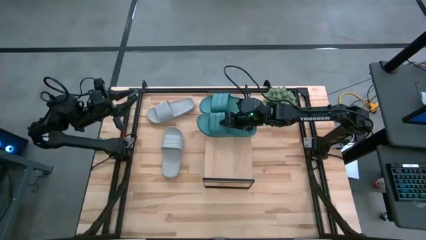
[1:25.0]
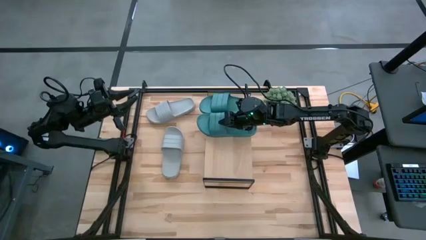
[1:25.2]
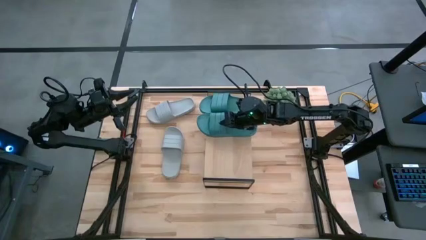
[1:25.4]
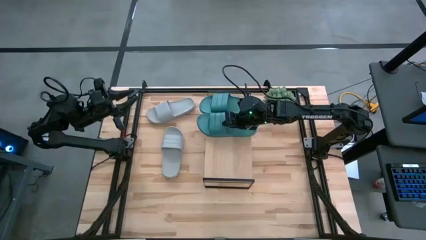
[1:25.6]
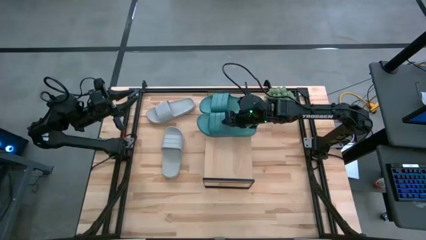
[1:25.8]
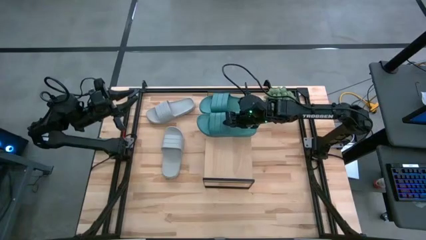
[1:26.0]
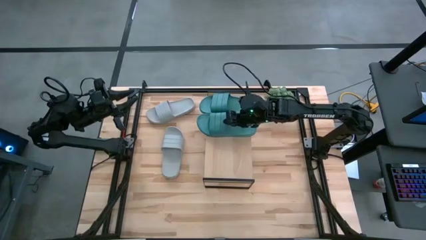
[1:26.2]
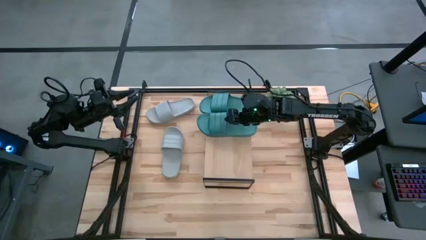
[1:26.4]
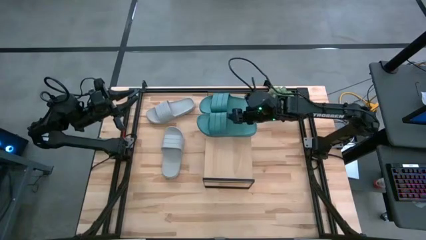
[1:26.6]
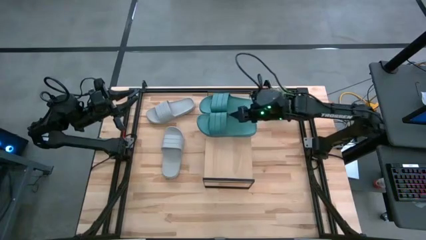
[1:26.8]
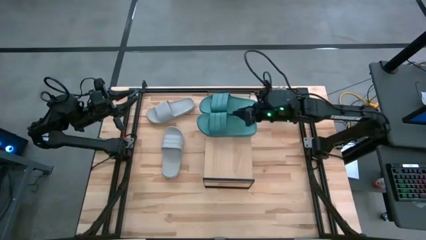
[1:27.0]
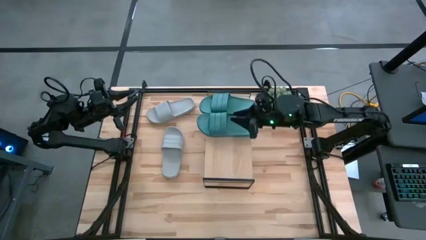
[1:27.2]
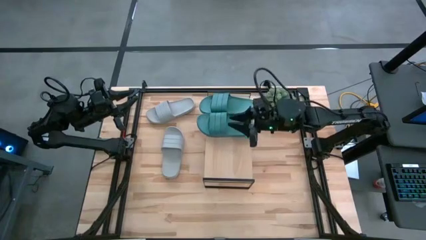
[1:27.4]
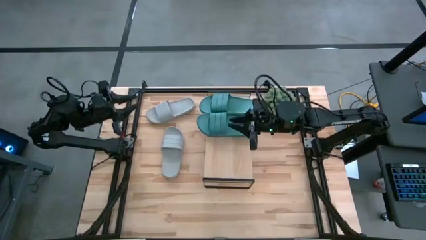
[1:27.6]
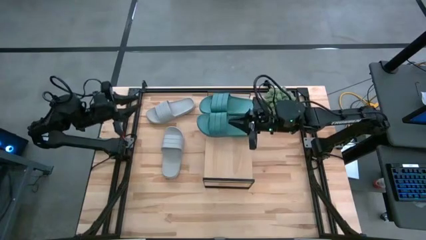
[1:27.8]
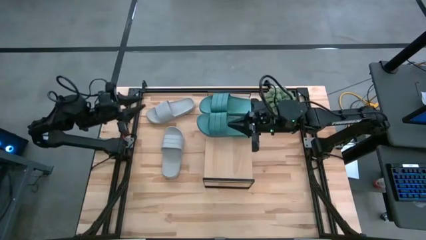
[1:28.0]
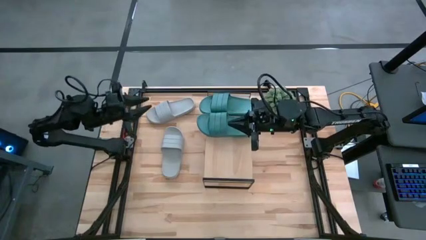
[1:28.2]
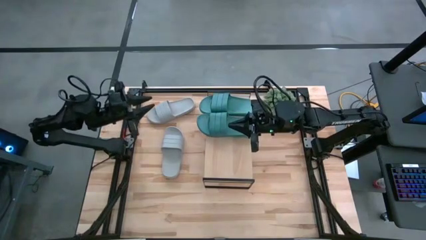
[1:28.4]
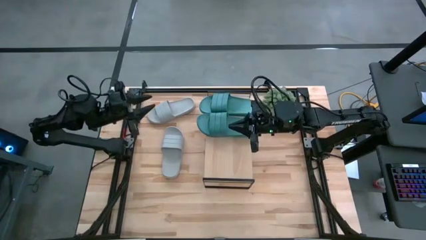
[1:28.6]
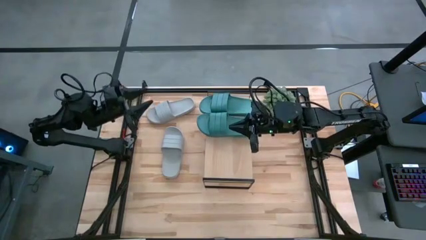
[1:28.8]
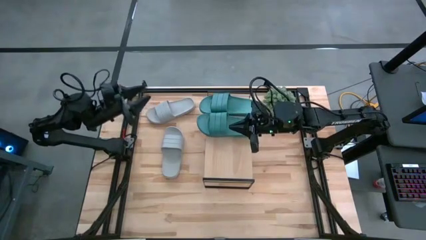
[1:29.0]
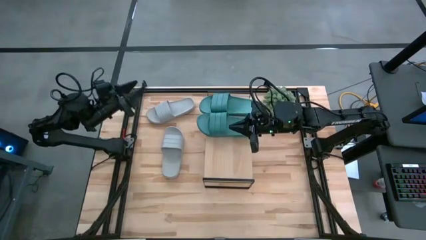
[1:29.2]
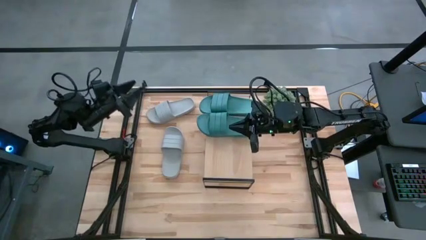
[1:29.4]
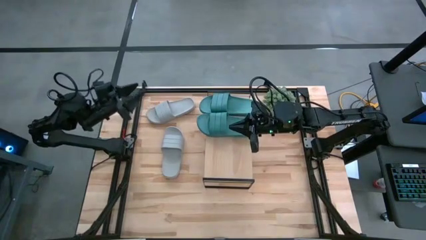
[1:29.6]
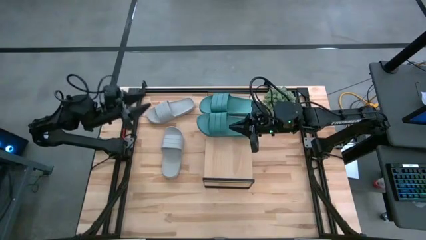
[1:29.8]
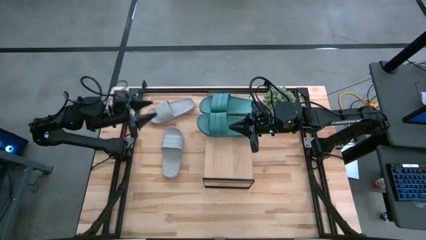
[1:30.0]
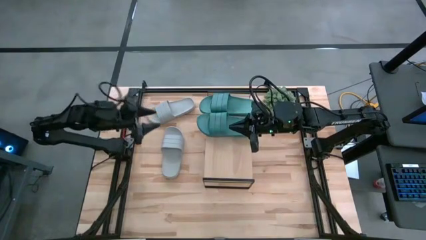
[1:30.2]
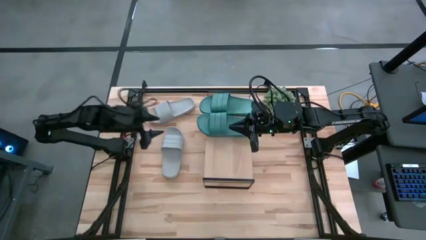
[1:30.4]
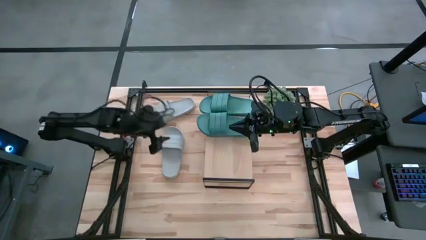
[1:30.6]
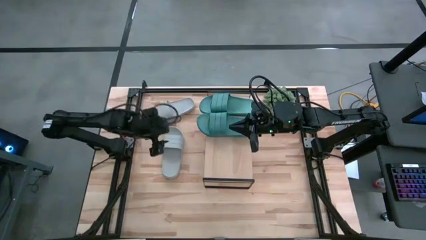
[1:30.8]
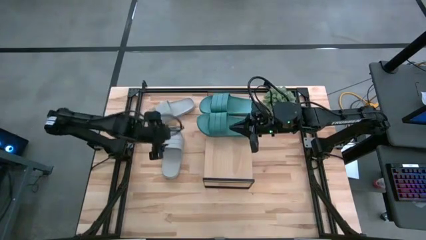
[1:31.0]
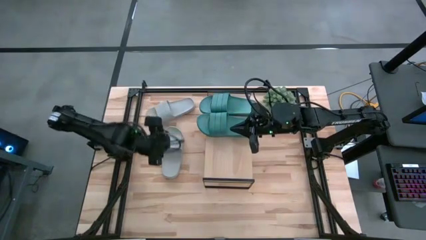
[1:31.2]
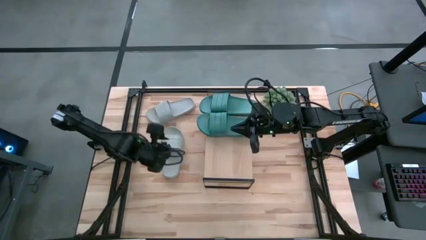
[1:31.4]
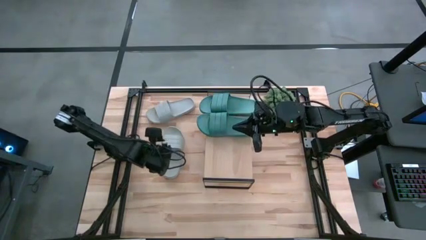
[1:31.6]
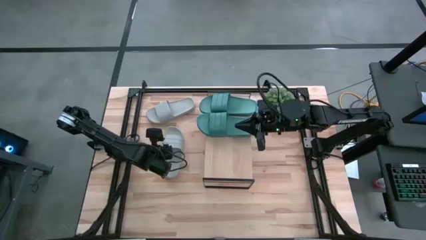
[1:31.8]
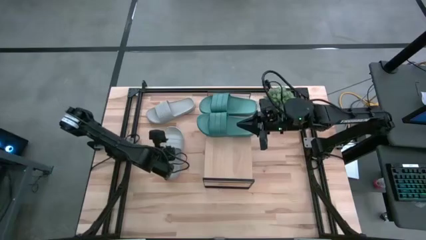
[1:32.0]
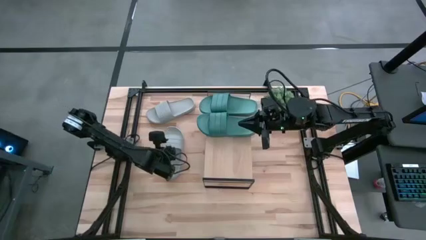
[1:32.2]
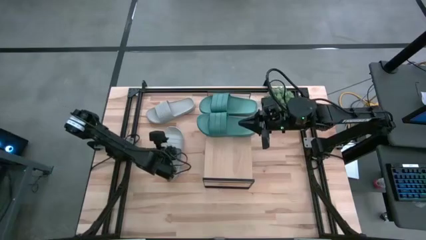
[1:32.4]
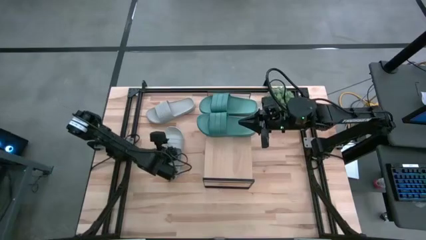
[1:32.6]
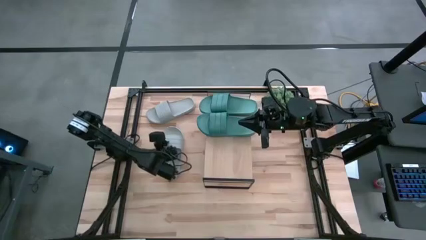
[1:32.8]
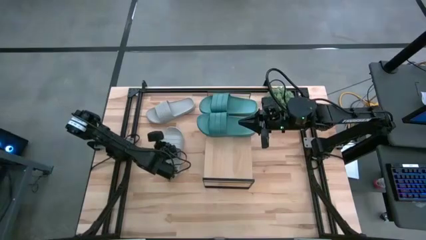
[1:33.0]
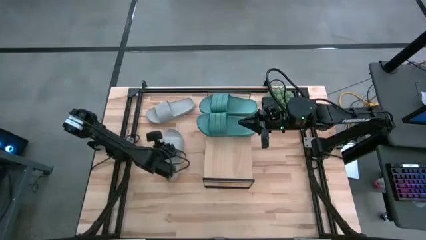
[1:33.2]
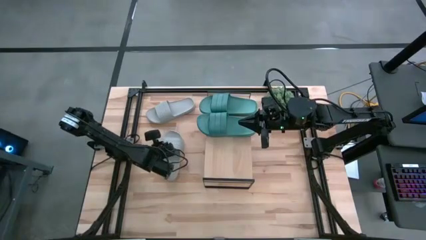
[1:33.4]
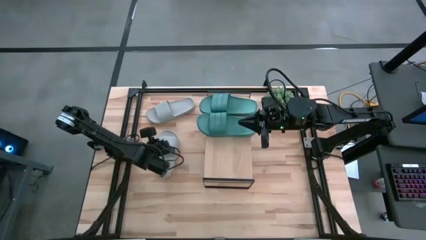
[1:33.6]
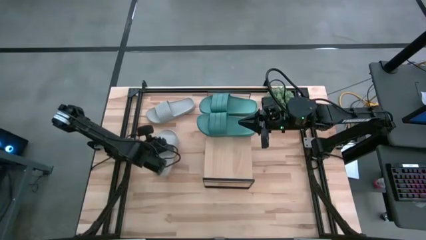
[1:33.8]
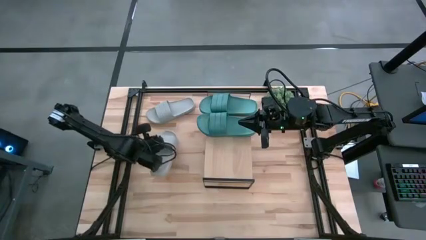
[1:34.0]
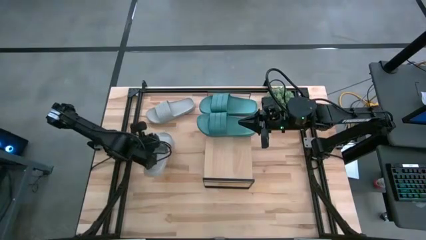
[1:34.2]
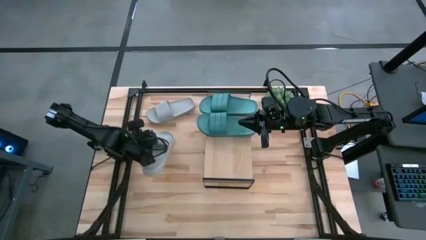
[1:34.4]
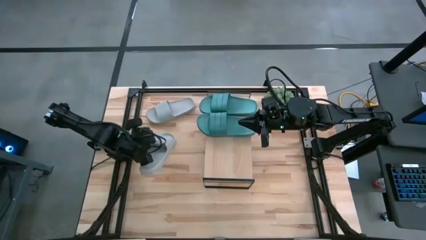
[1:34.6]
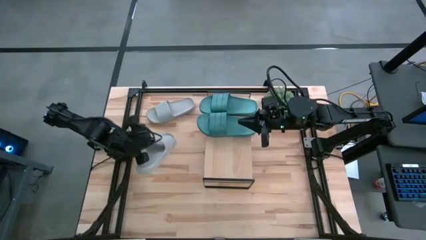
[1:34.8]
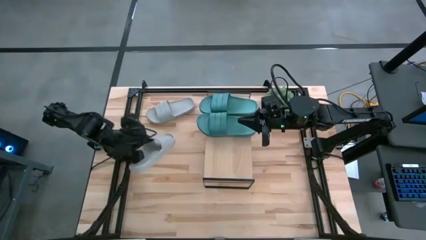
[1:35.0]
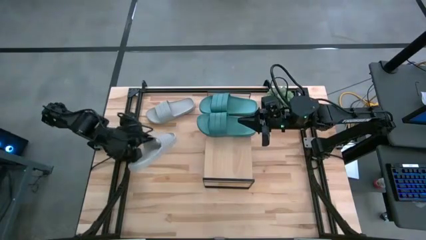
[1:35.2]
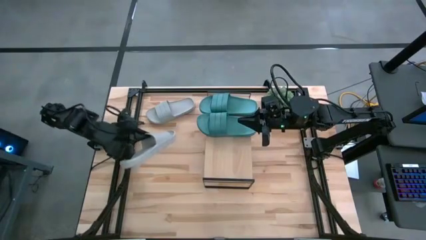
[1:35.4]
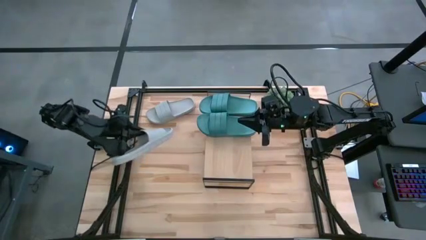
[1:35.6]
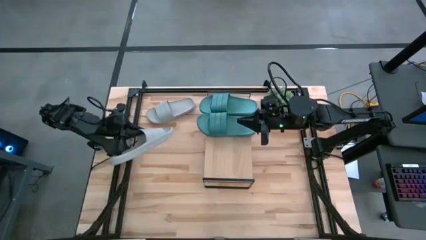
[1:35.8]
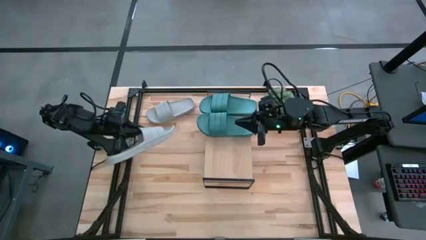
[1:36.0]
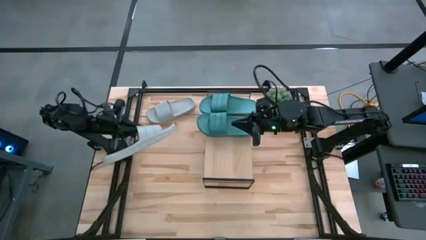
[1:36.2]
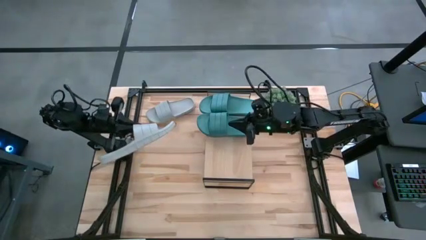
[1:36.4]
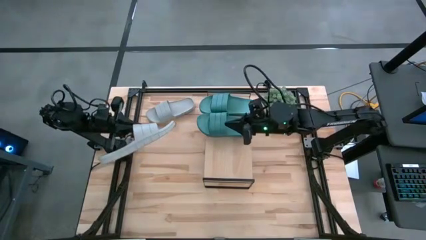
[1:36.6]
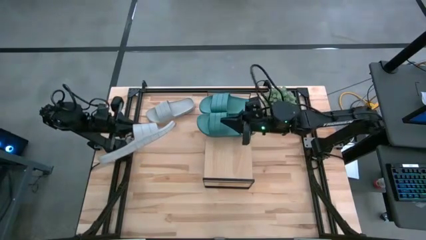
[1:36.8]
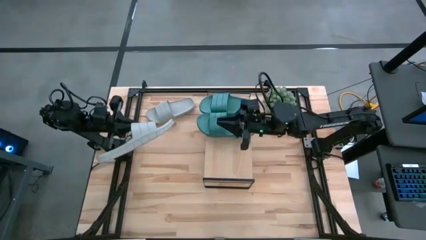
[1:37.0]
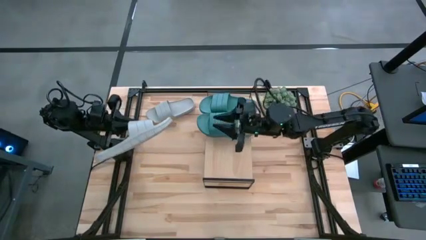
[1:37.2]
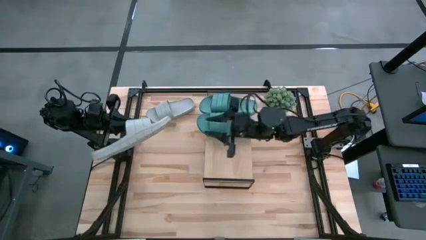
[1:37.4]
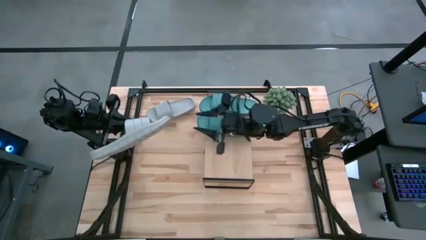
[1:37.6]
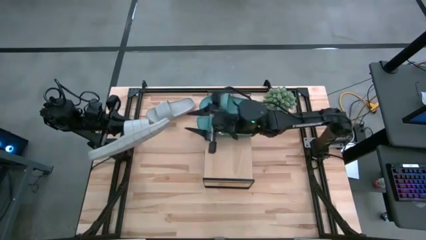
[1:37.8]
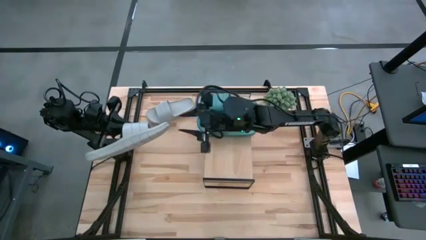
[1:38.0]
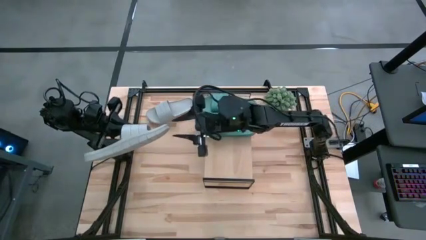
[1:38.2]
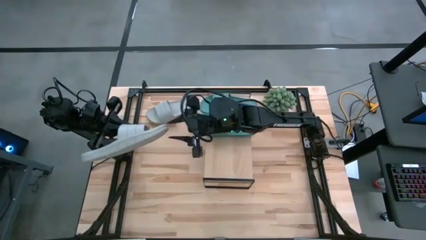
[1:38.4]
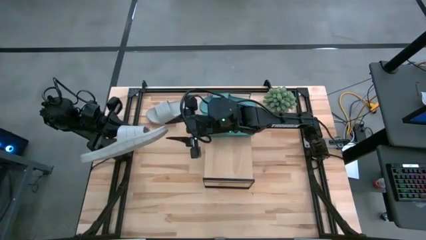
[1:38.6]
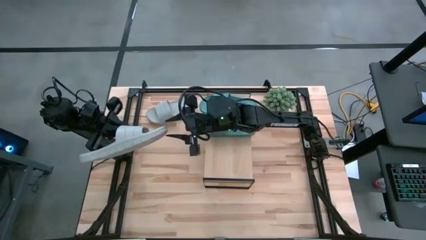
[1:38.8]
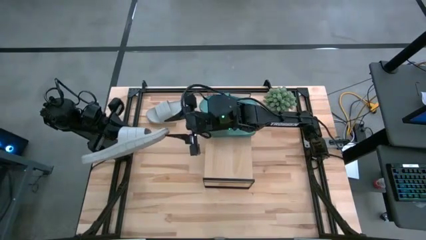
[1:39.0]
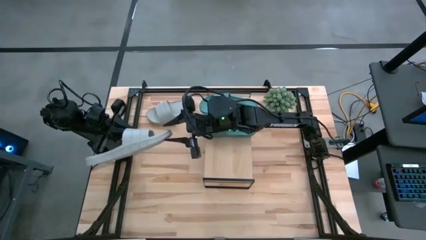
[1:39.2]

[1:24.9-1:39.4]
Task: Pick and place slides into the shelf
Put the bottom gray slide on the shelf
